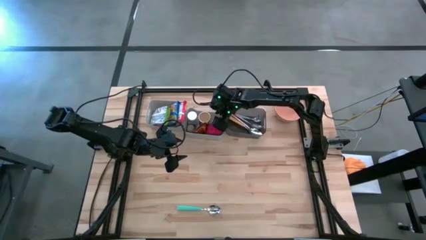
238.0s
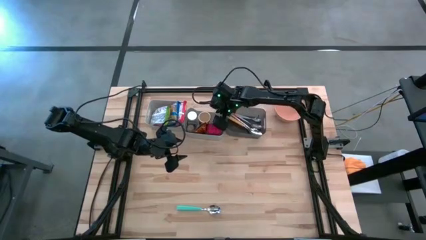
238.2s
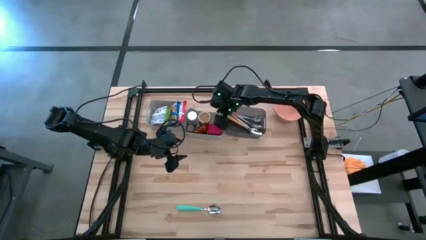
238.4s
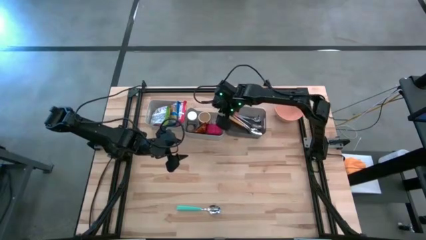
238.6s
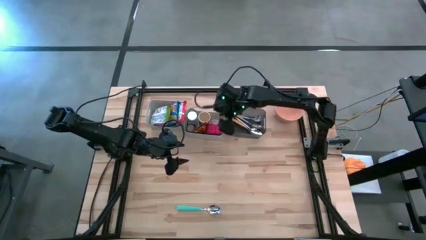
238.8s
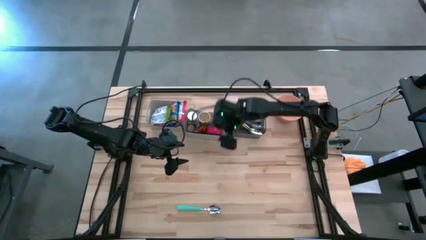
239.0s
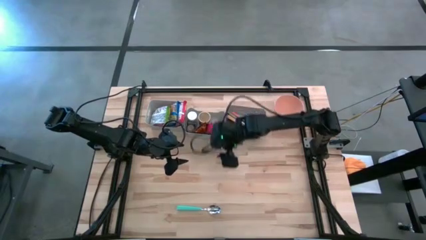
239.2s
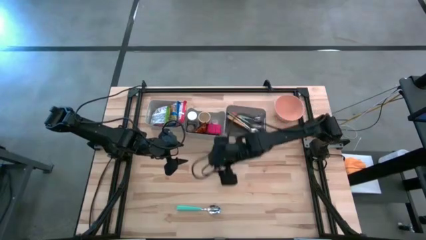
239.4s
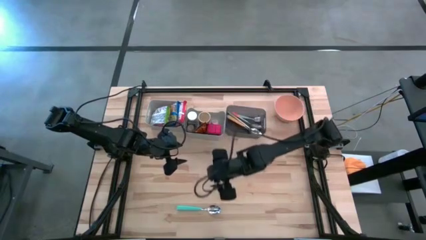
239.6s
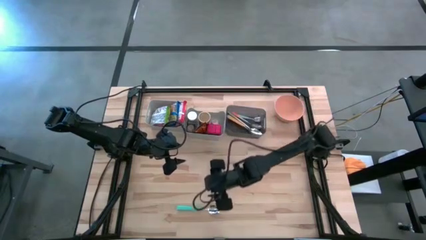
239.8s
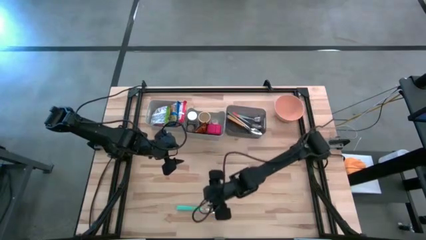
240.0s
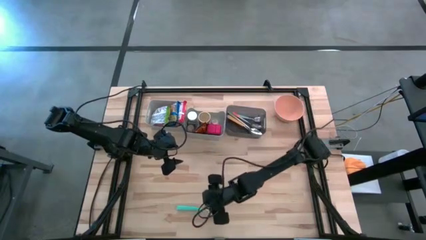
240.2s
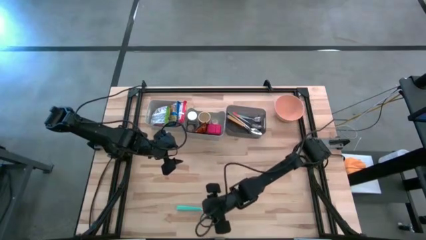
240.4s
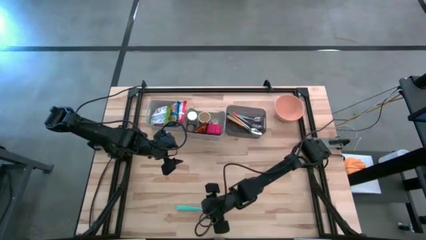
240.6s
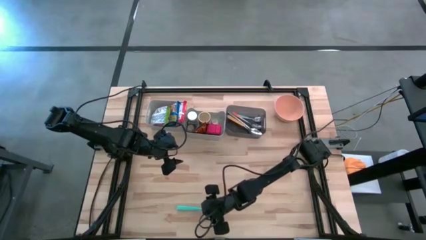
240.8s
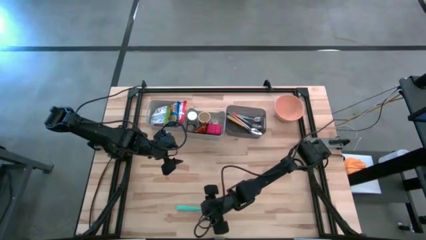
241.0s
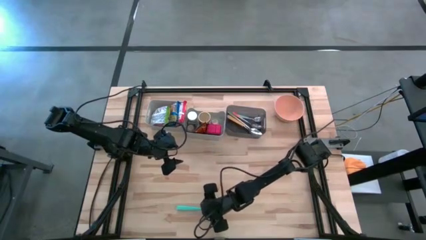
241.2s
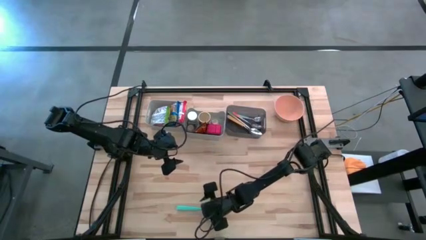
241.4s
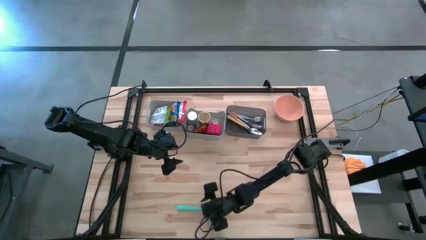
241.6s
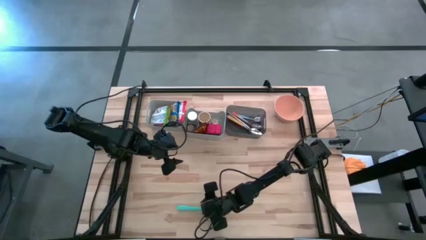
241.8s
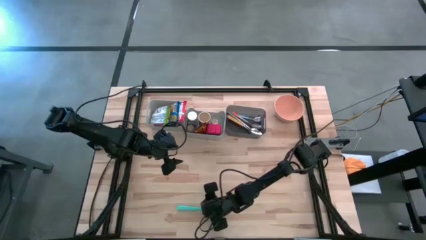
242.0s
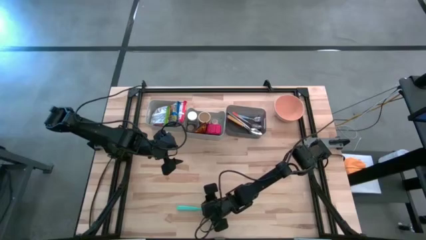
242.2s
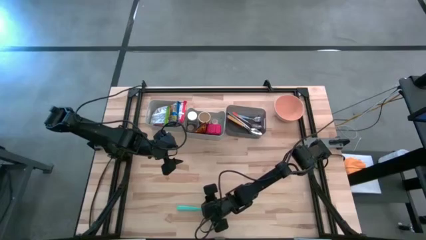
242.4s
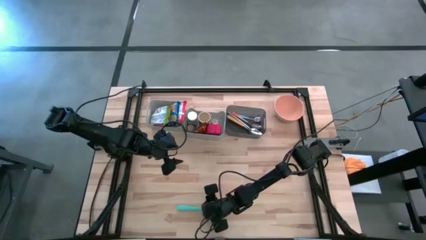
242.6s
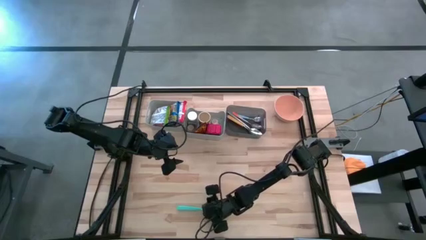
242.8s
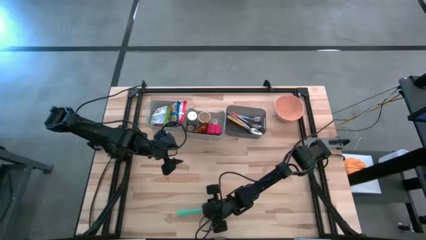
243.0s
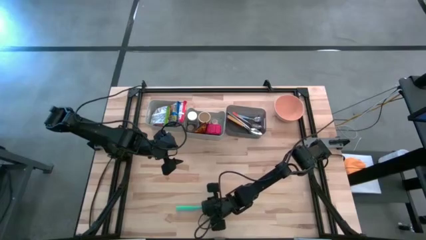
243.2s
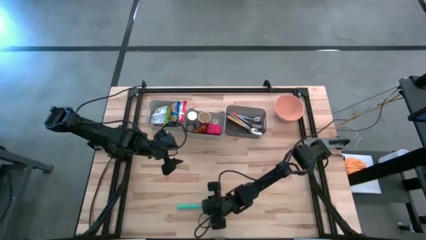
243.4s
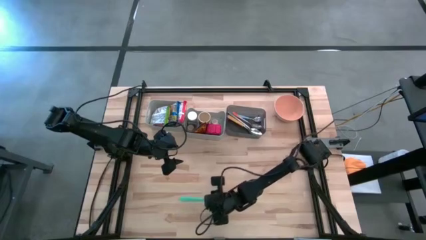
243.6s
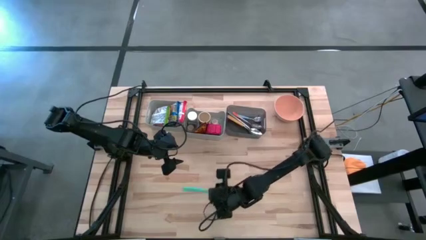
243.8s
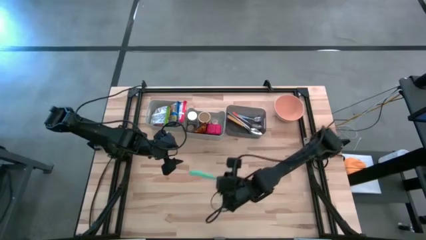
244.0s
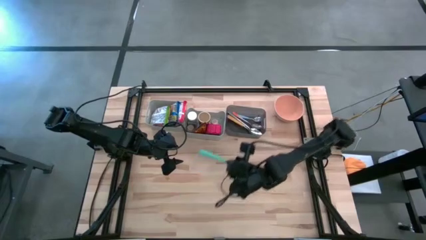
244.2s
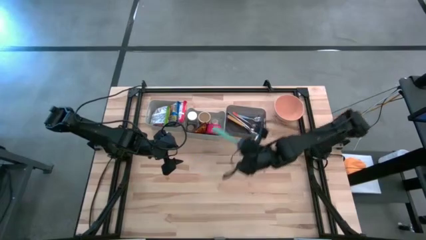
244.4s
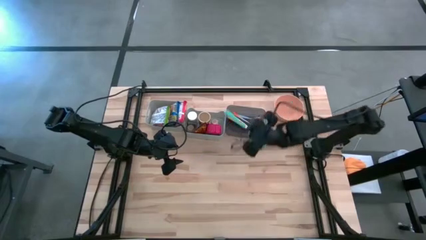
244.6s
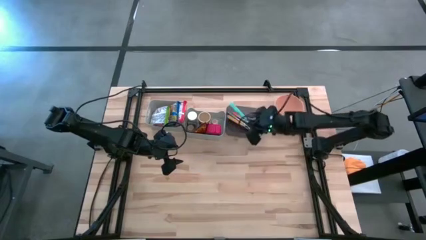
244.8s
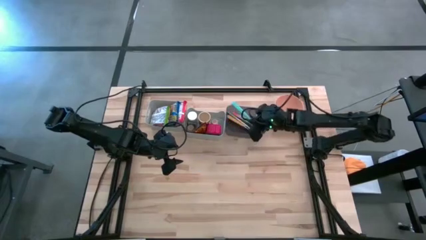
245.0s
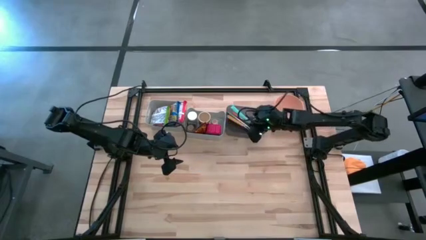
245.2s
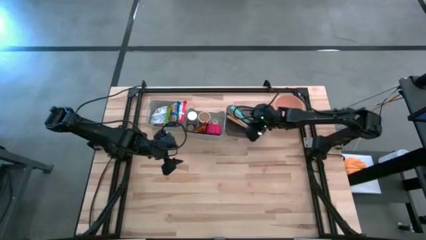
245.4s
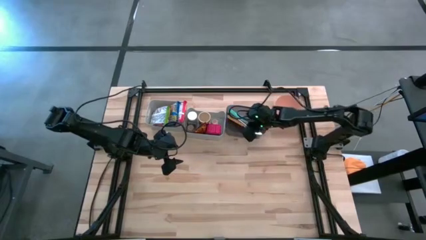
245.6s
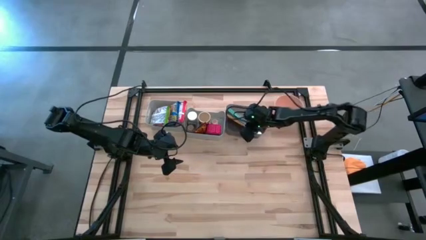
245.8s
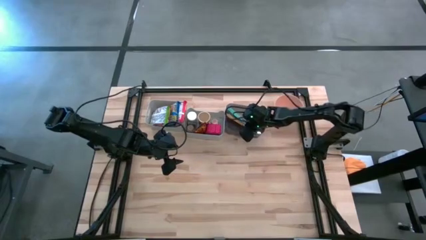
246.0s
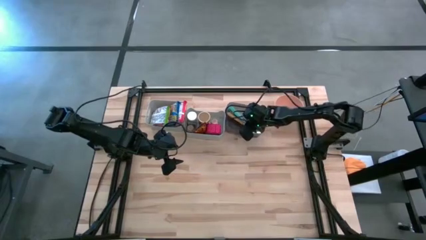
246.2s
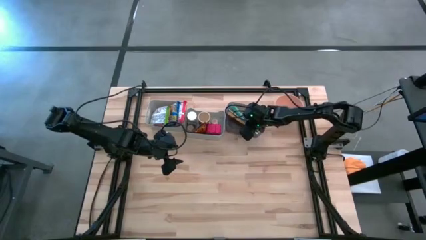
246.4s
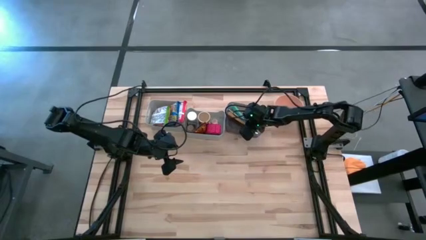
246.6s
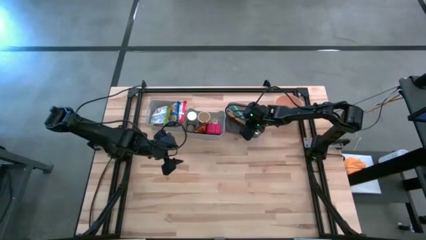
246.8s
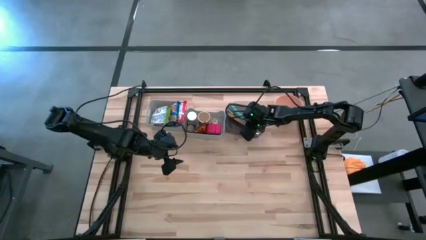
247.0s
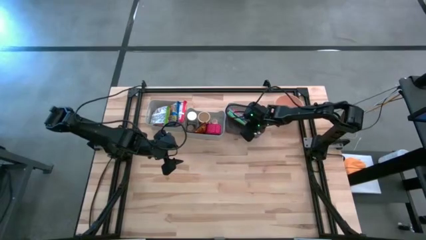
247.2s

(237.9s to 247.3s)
Put the blue spoon into the black bin

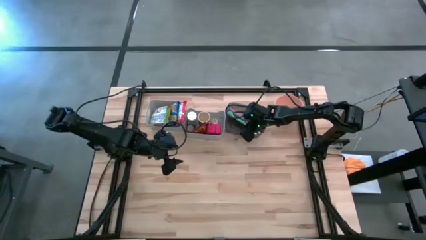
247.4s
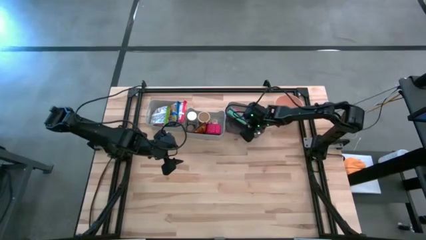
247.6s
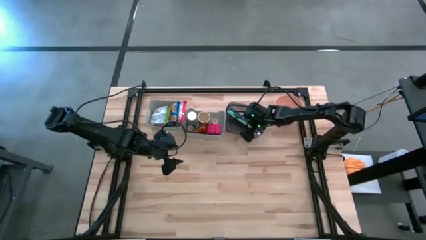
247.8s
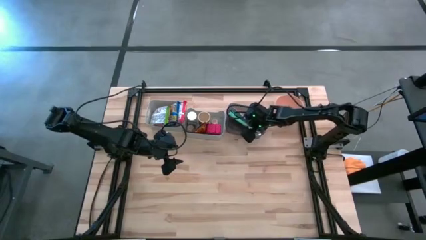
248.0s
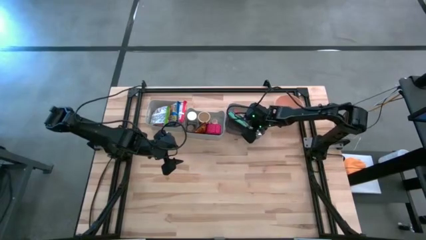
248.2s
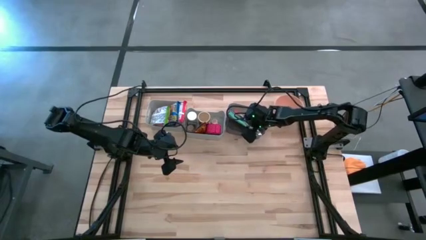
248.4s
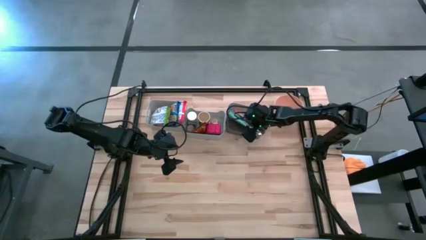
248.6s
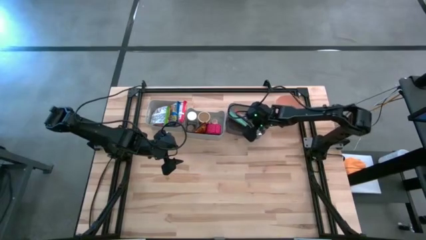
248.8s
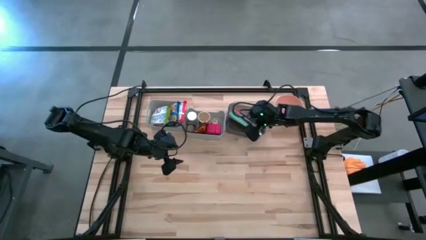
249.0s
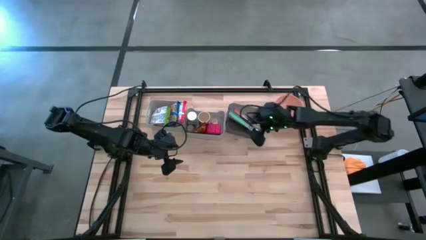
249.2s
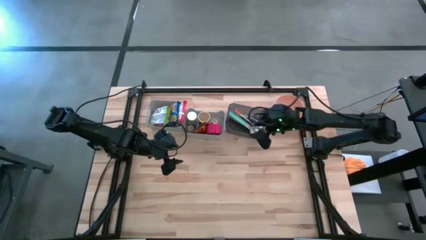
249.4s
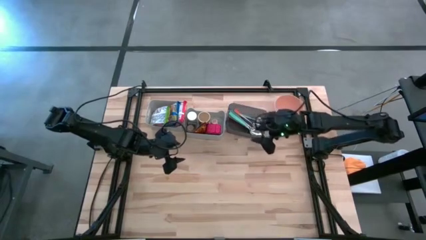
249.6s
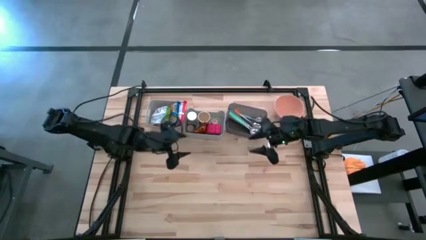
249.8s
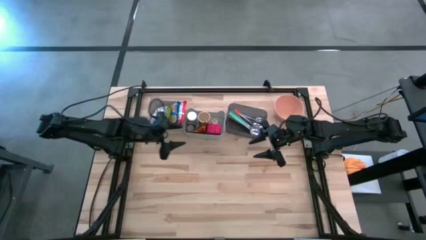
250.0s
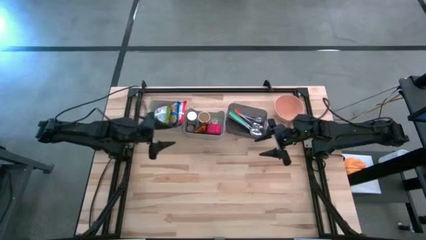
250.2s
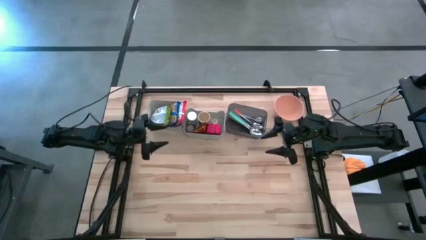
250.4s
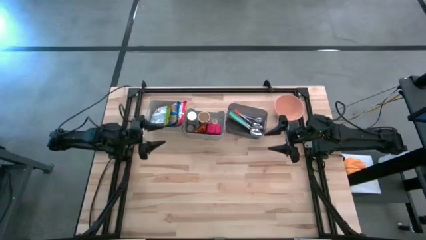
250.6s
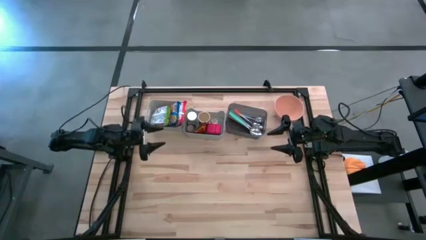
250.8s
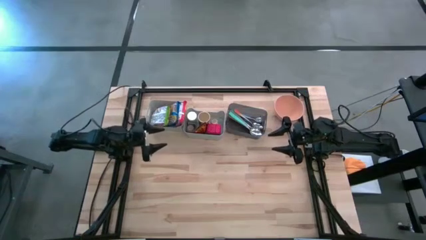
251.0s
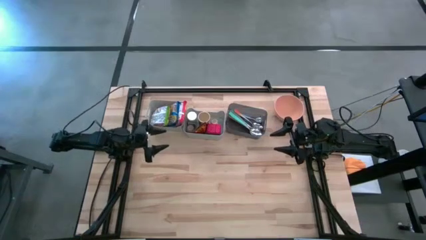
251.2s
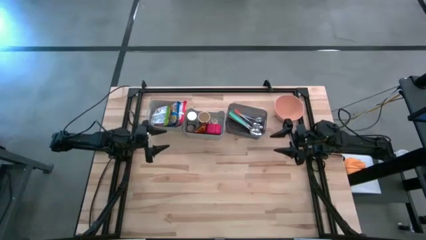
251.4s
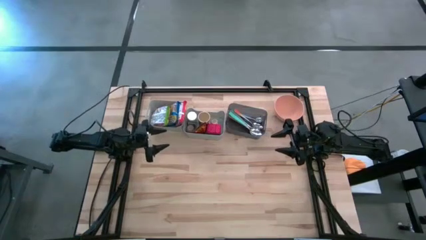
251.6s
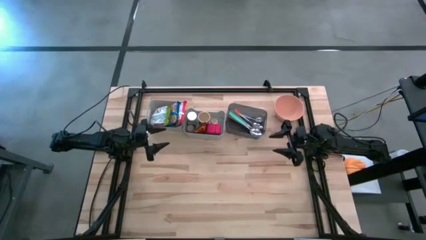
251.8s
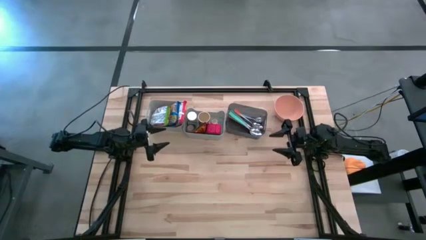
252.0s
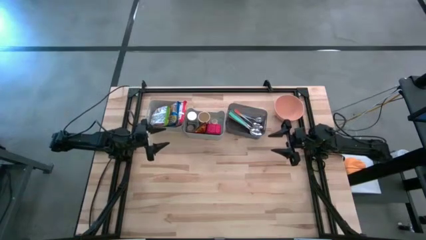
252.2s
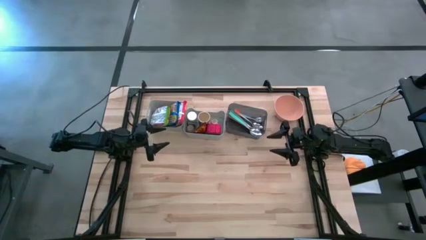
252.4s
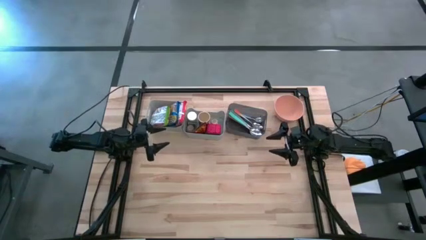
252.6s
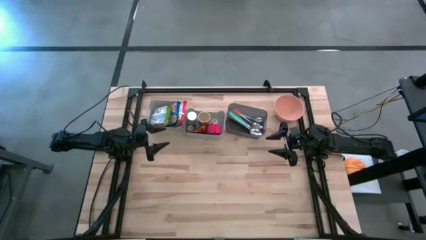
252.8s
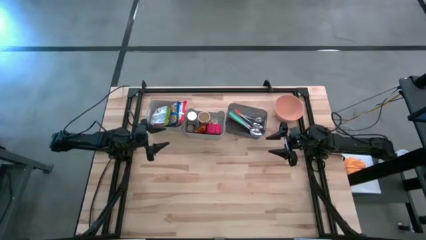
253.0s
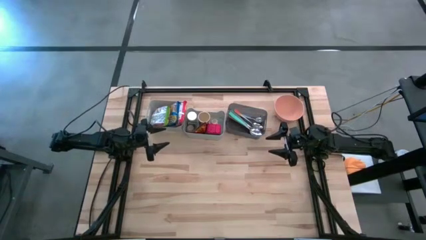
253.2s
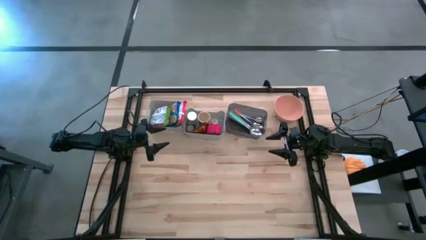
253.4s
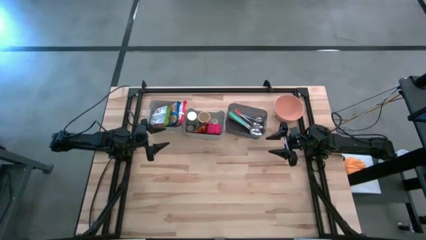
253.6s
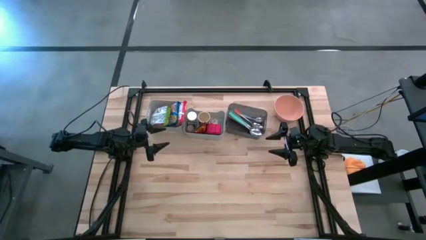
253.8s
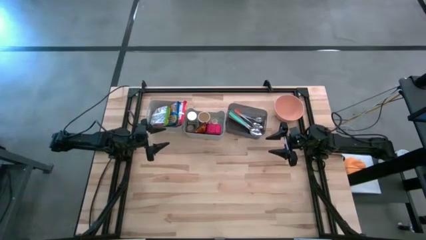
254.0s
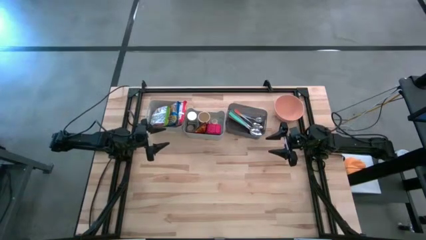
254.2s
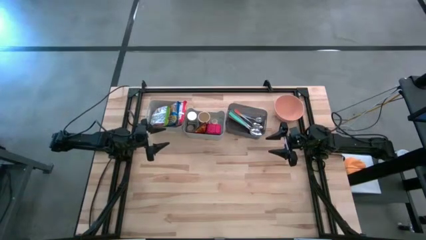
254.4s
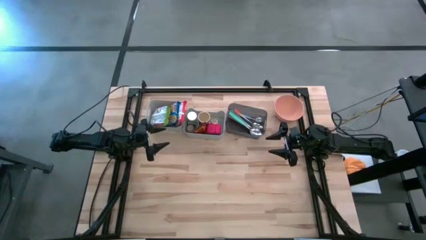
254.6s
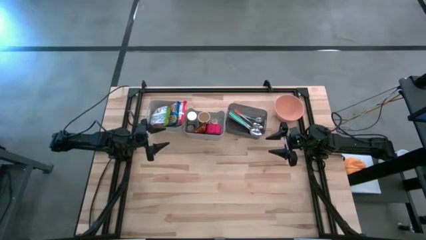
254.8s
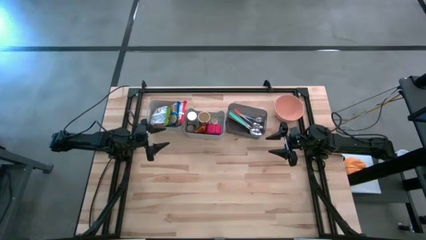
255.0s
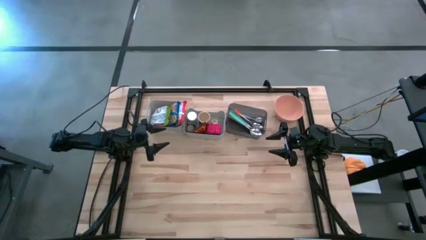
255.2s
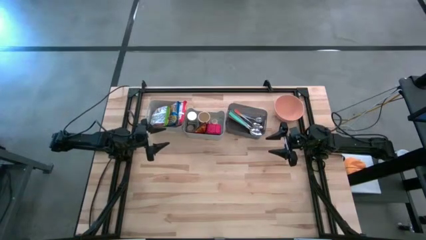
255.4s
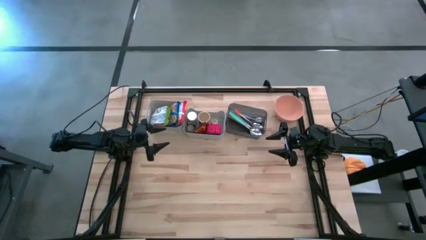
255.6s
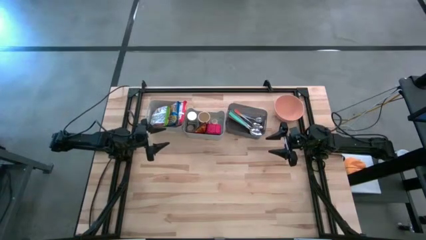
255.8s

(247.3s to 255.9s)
Return to Home Position
